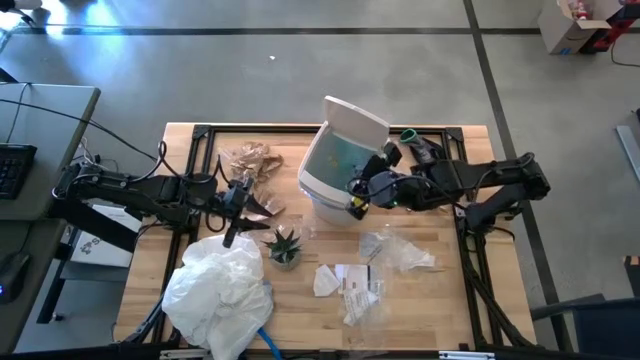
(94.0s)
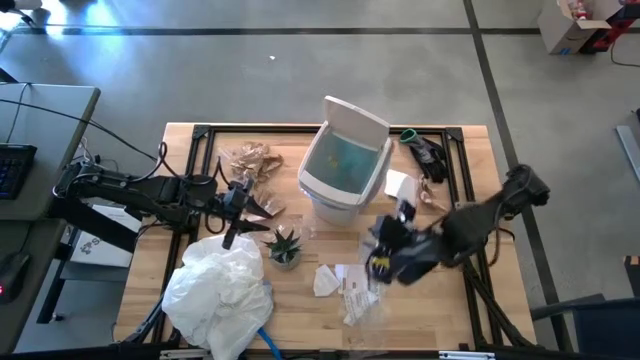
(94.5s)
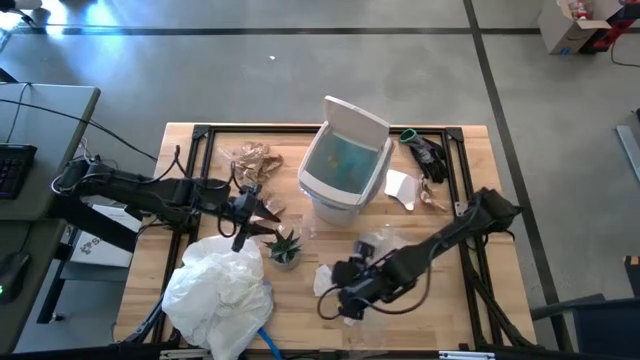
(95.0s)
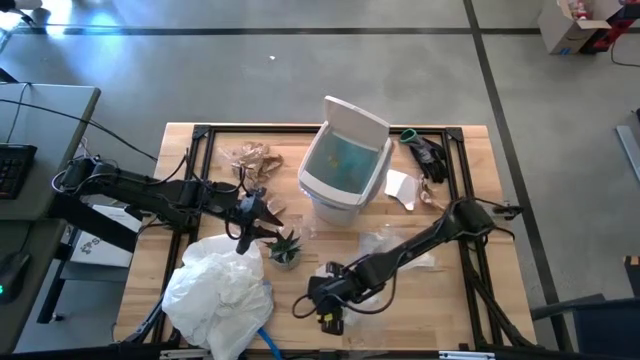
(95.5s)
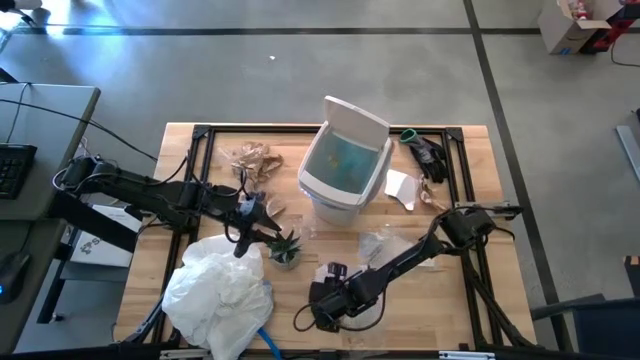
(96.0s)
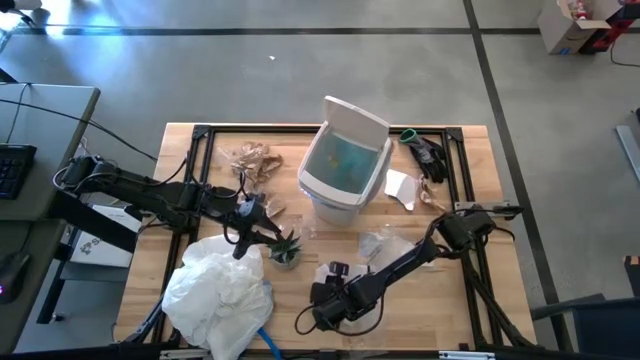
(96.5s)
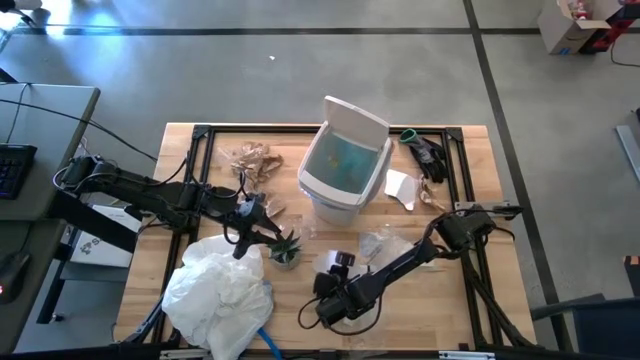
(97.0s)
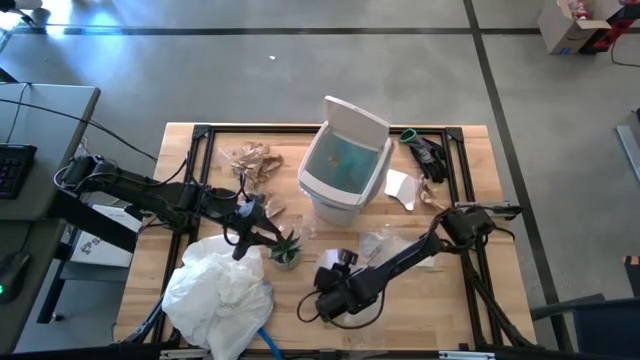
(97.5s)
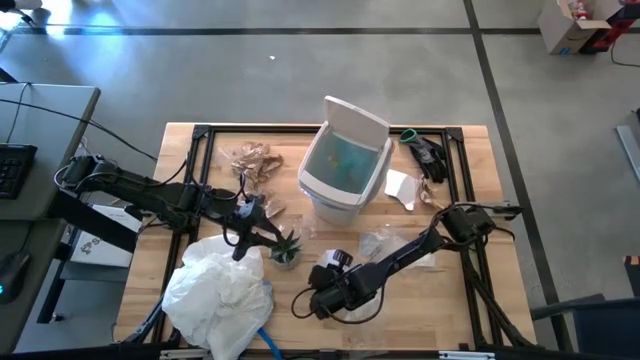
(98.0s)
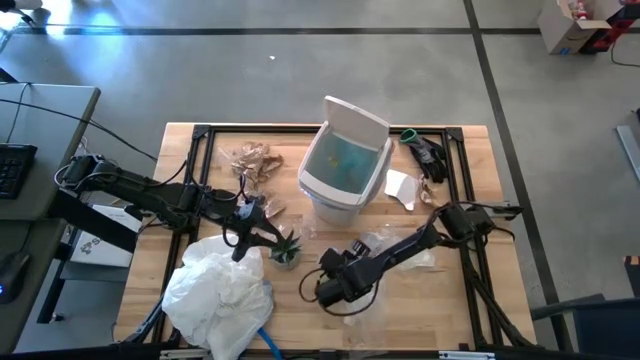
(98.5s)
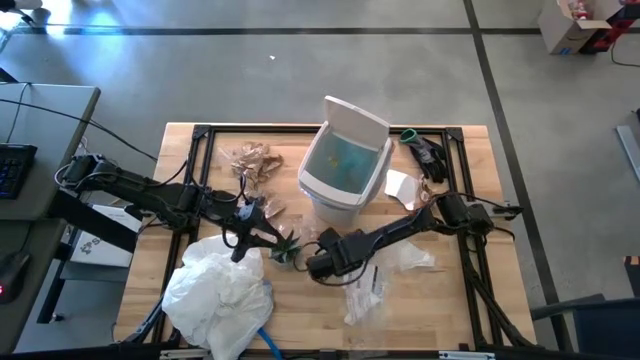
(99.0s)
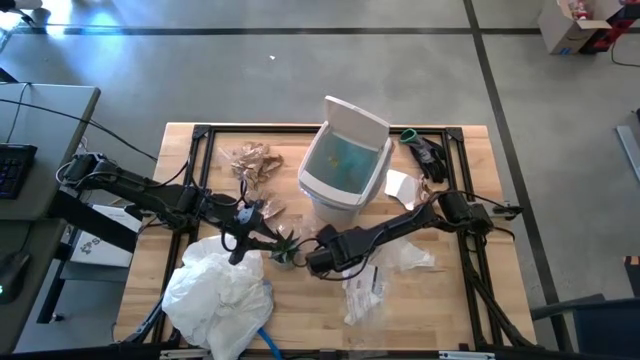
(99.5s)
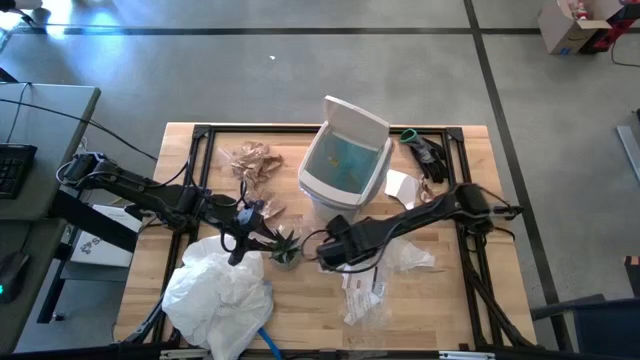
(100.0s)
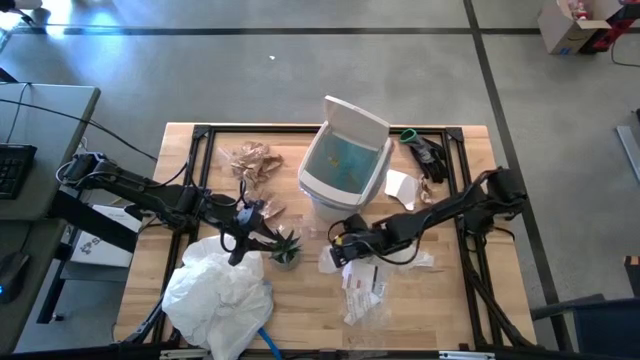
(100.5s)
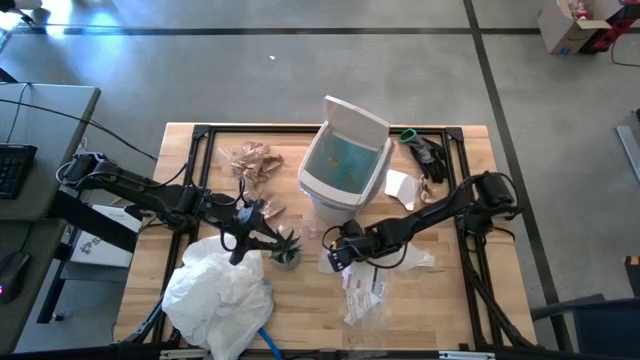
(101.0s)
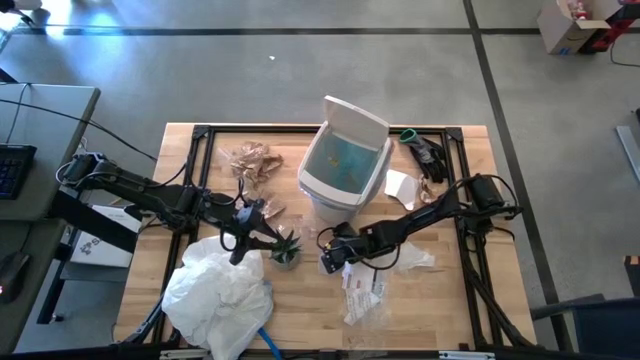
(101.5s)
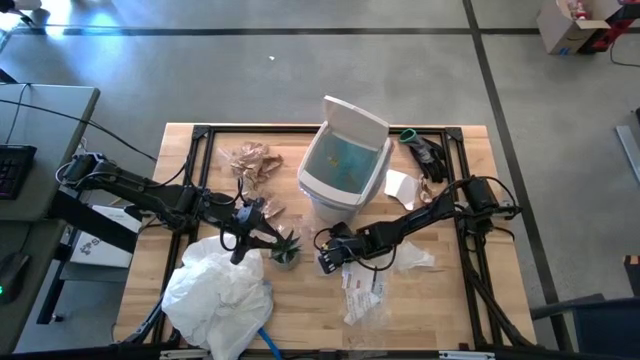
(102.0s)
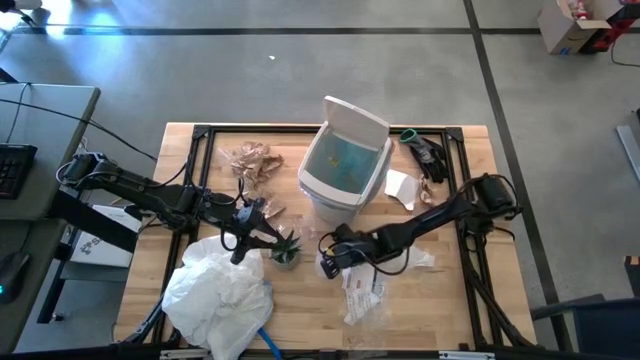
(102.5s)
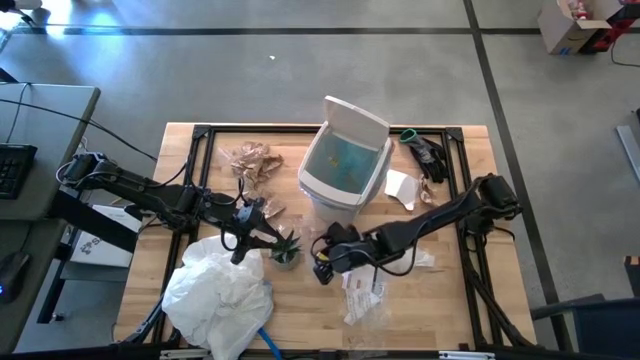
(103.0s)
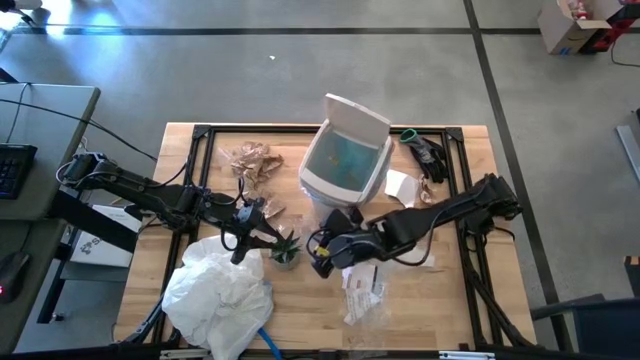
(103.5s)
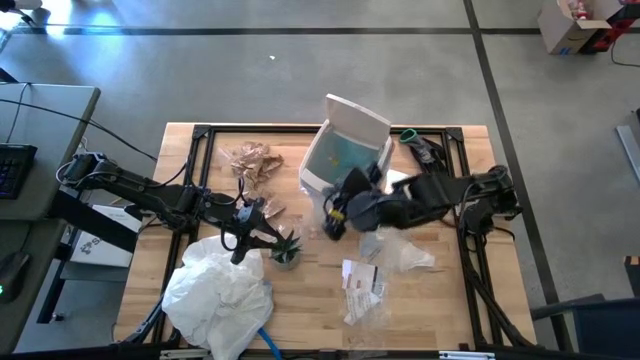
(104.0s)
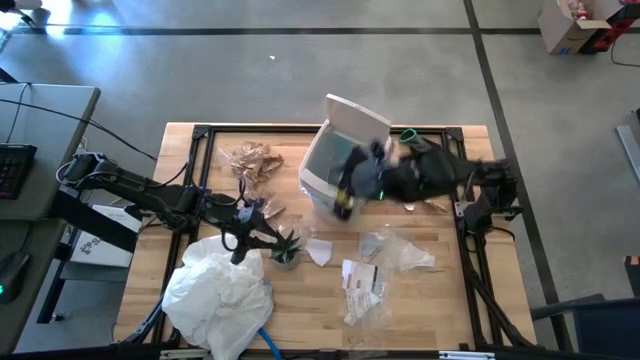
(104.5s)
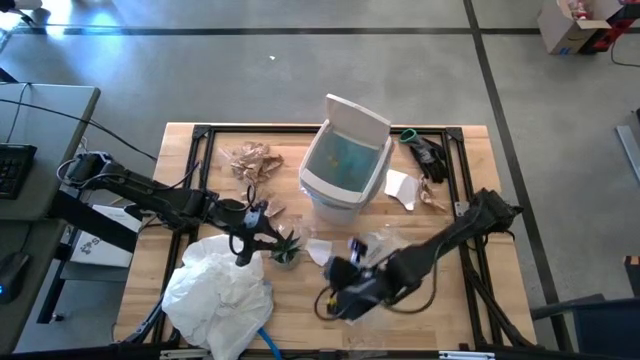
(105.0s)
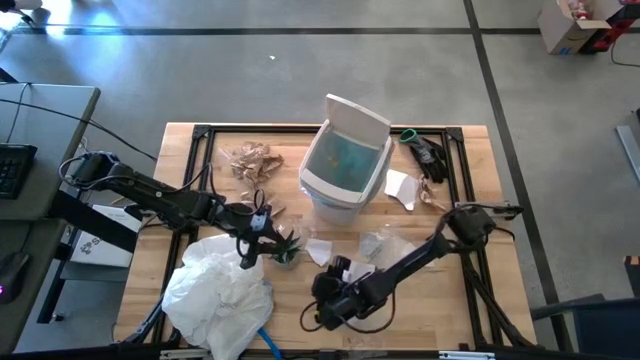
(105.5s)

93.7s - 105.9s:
Task: place trash/remove bag and relplace
Put the white paper into the trash bin

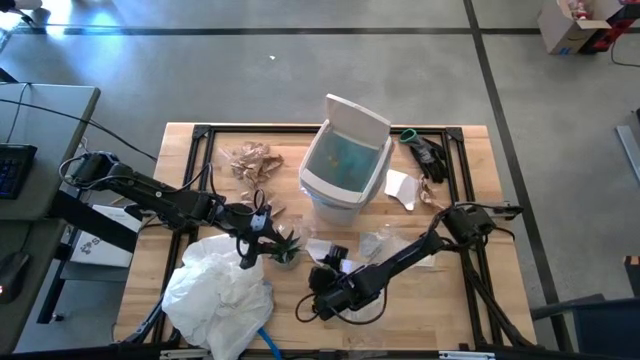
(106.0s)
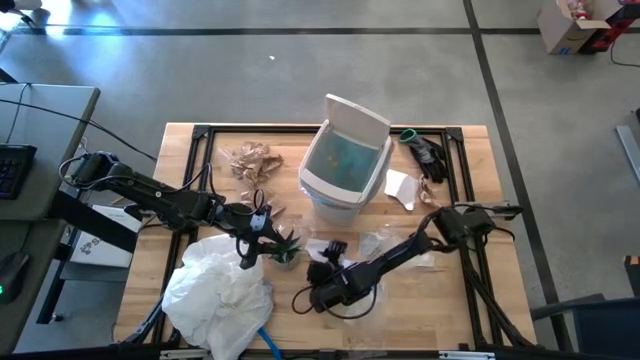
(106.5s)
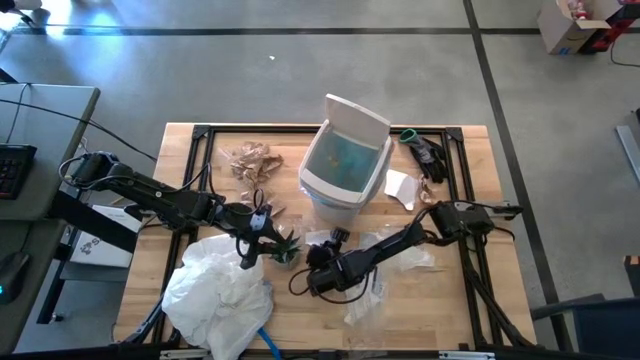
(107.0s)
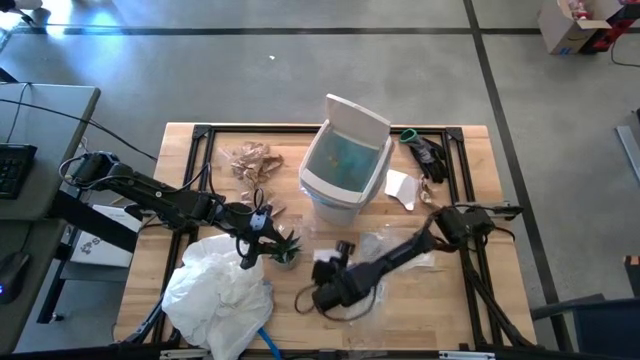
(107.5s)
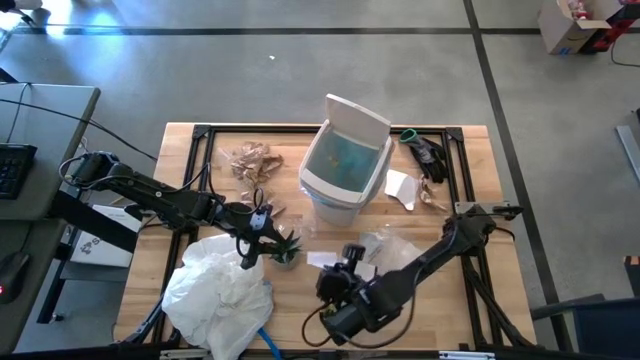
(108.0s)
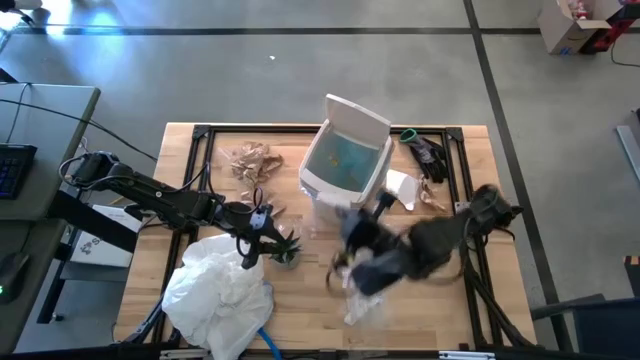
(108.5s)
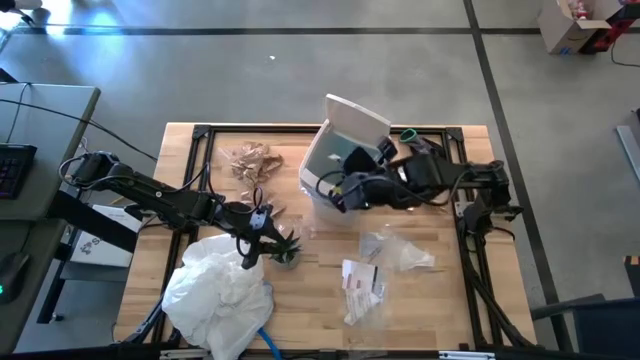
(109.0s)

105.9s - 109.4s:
Put the white paper into the trash bin

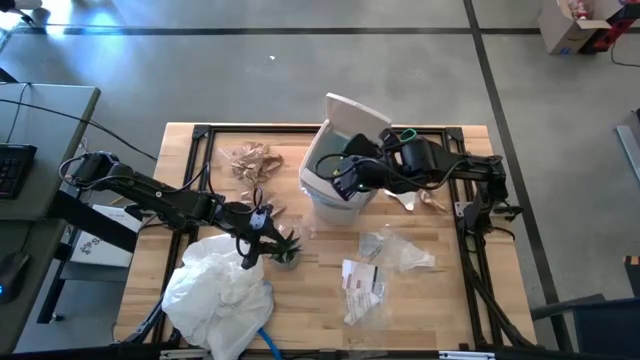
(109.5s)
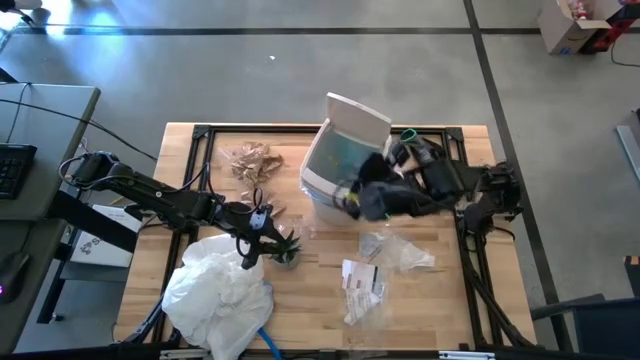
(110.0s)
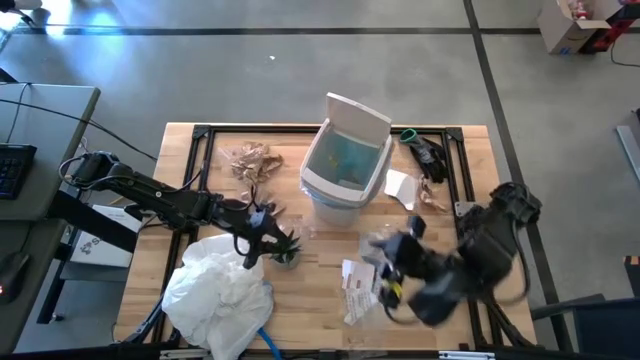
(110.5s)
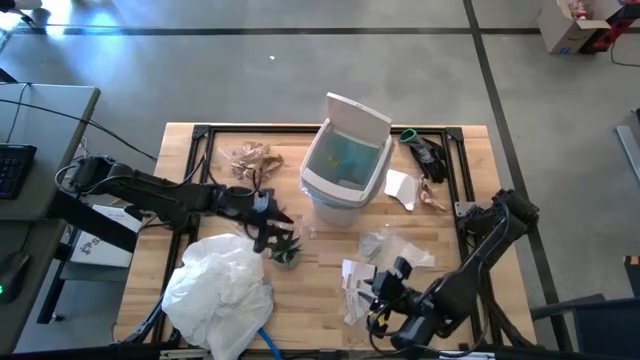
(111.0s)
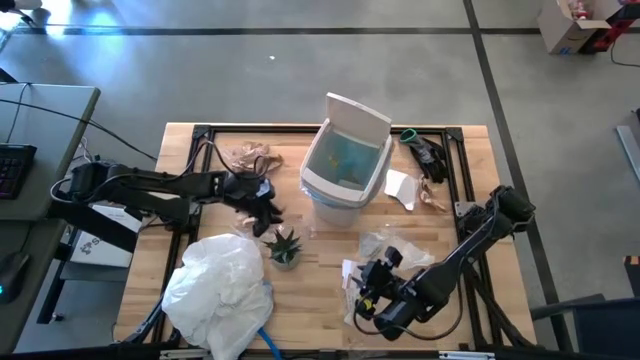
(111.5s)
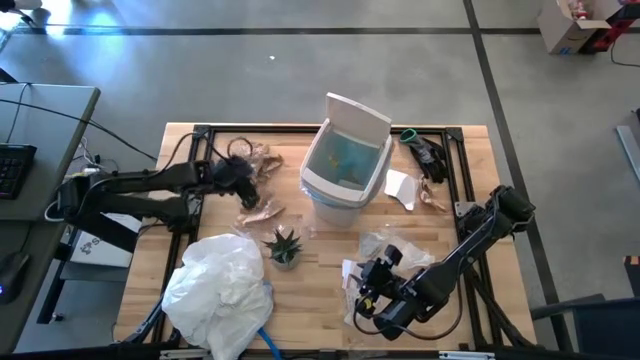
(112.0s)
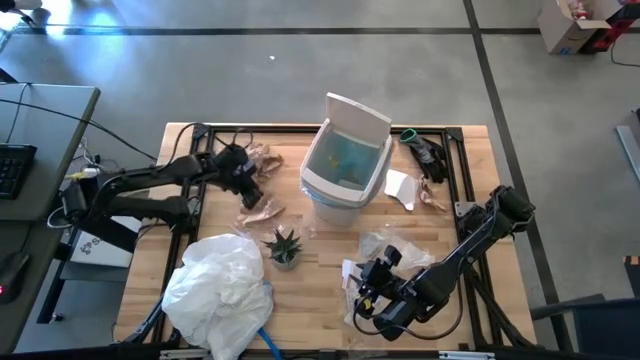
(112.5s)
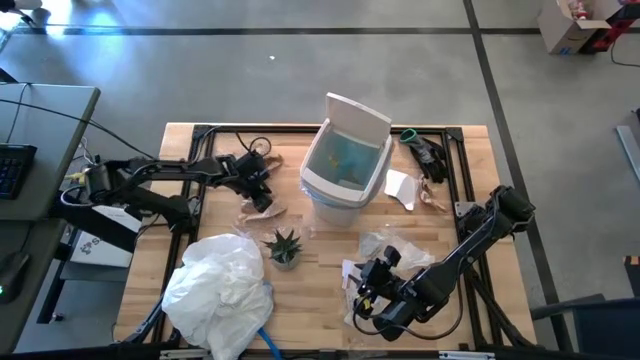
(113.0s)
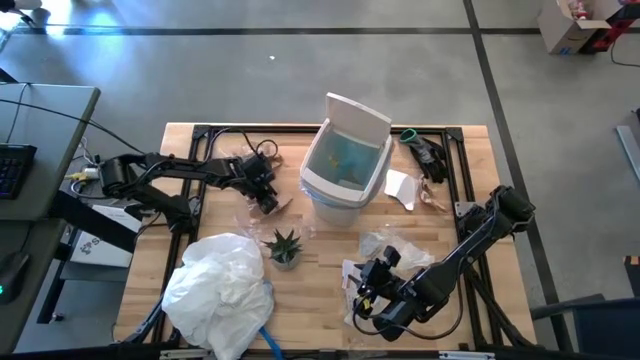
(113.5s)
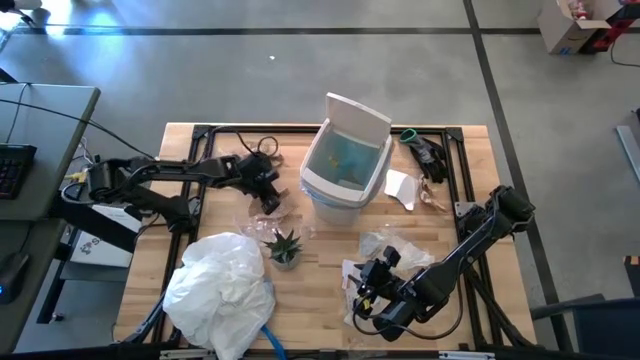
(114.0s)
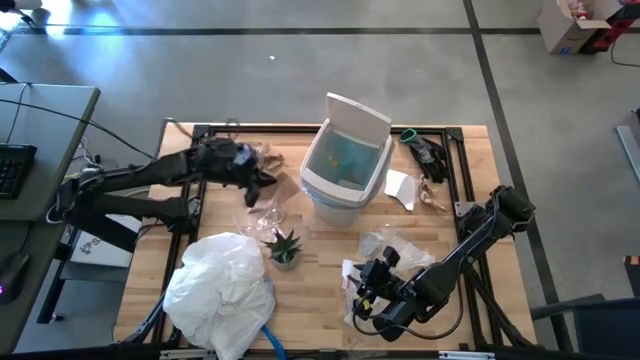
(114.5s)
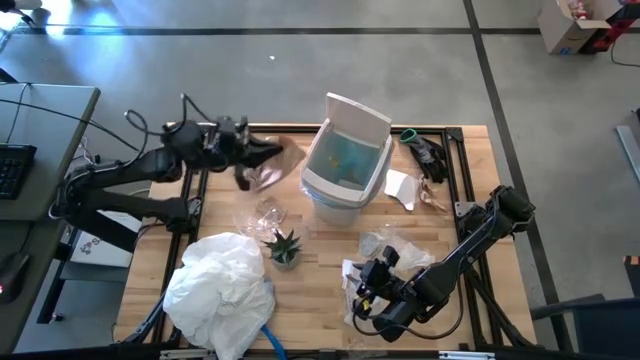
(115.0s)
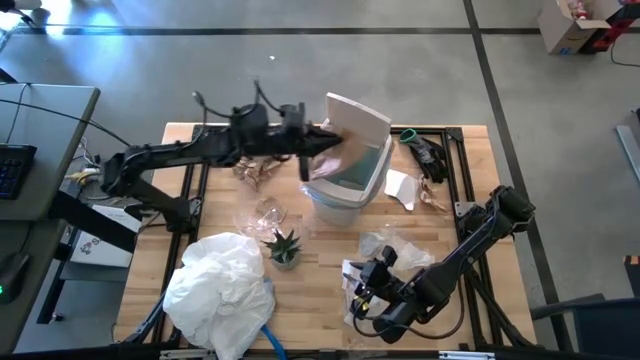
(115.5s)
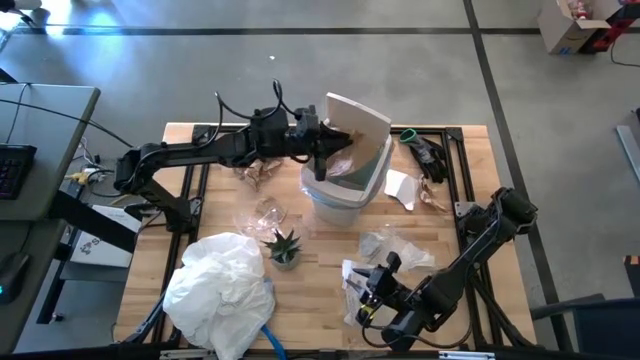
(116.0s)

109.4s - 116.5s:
Put the brown napkin into the trash bin
